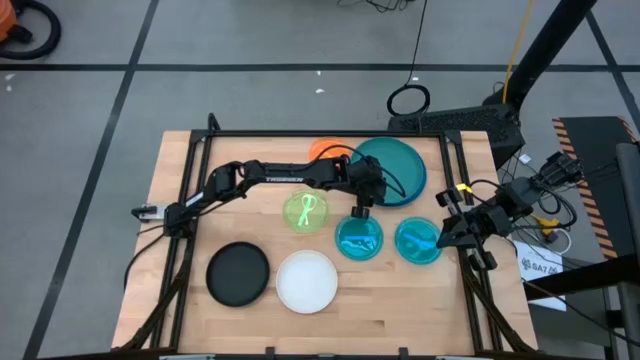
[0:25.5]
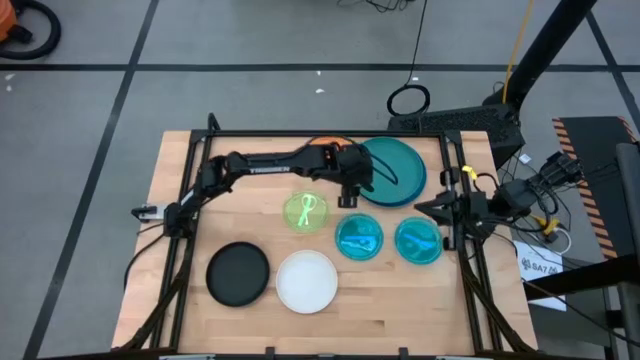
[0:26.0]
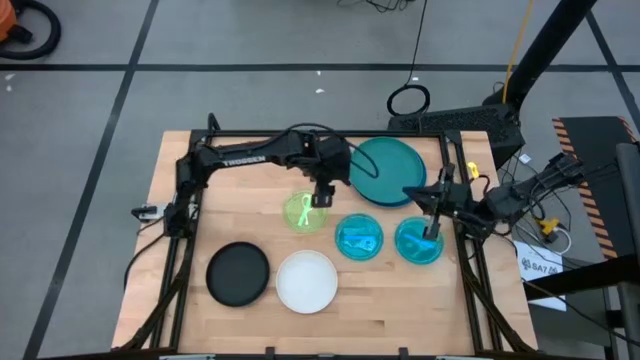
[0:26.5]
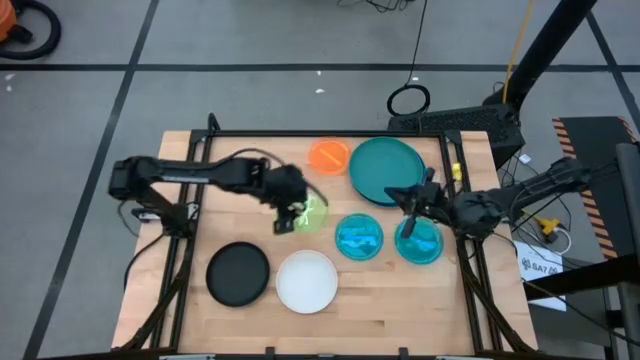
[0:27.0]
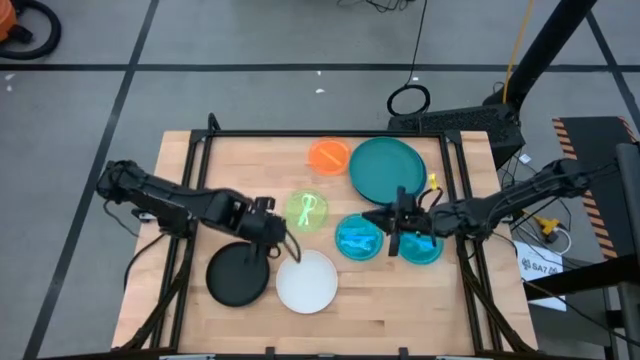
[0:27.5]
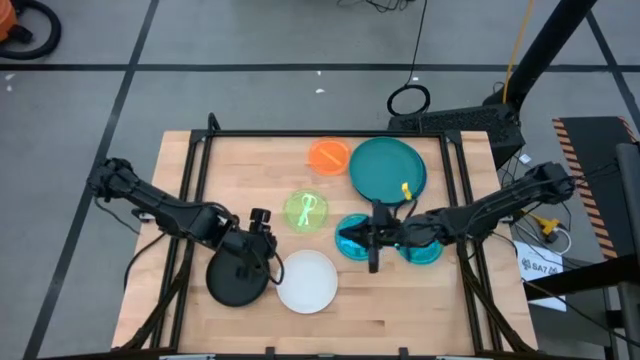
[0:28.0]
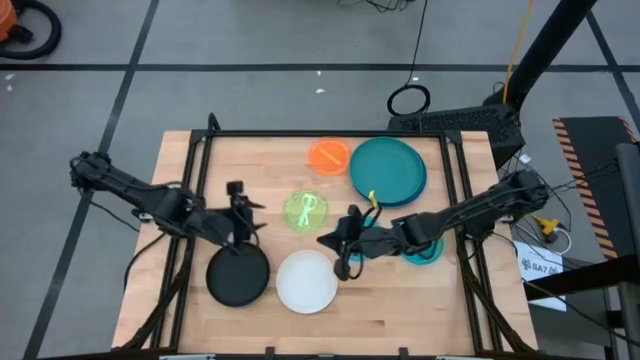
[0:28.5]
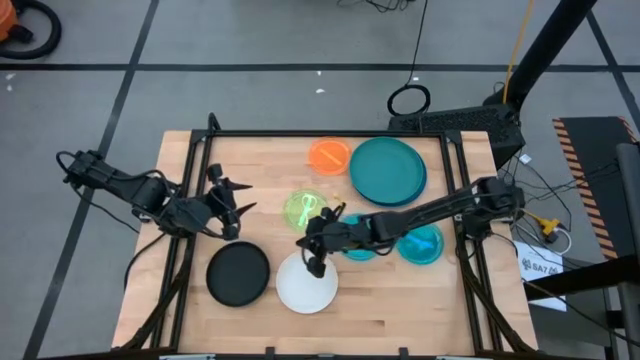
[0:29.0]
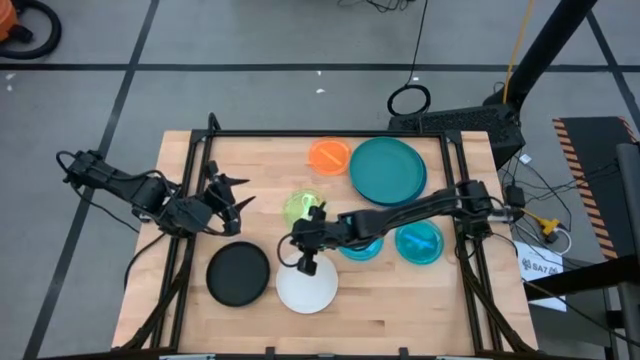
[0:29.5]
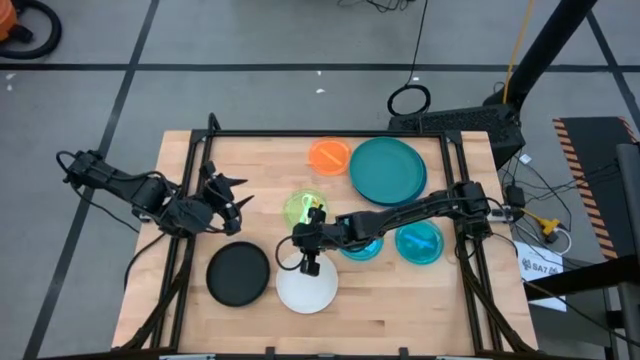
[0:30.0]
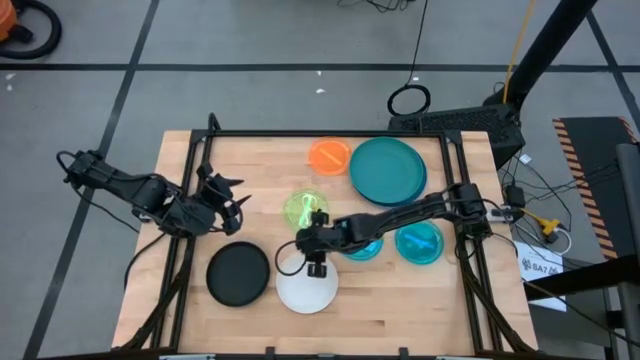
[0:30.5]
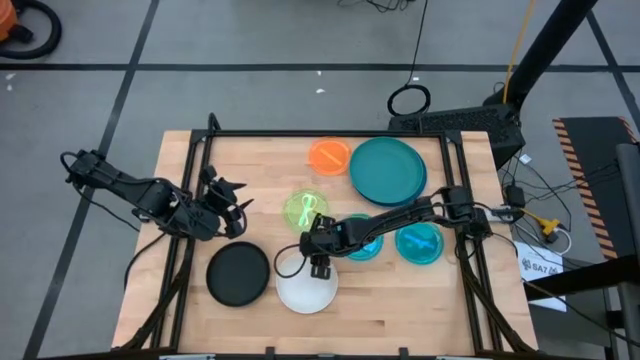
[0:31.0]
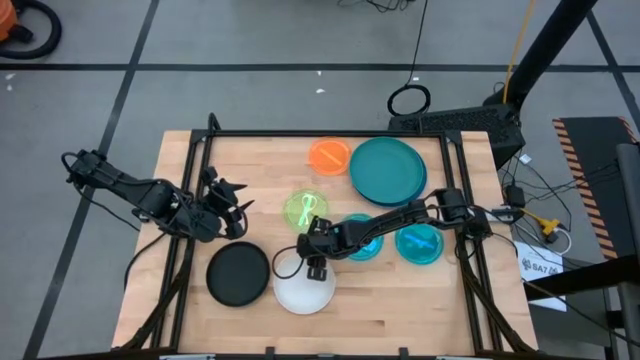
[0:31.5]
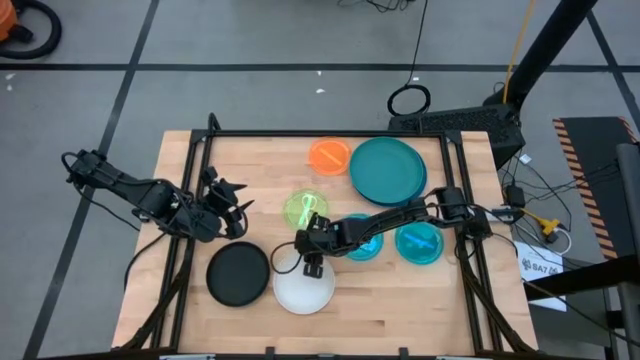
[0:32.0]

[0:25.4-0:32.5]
Task: Stack plastic plates
Stack the white plate on top of the black plate

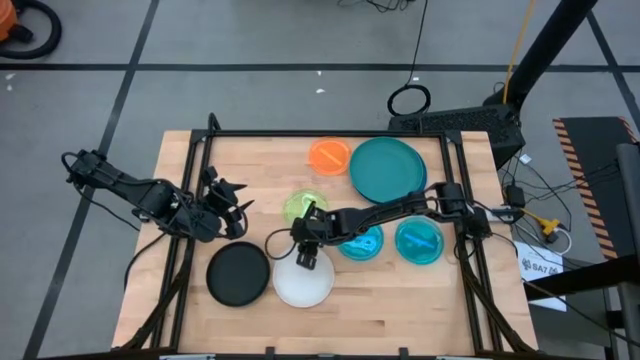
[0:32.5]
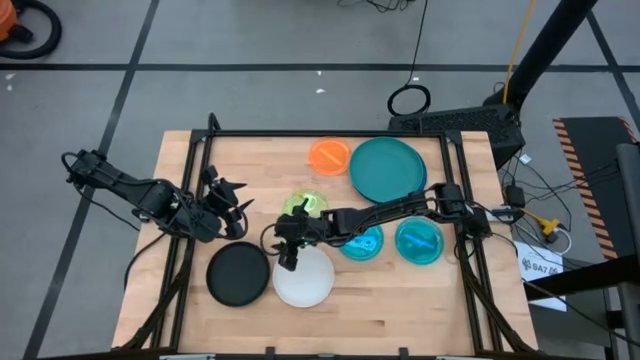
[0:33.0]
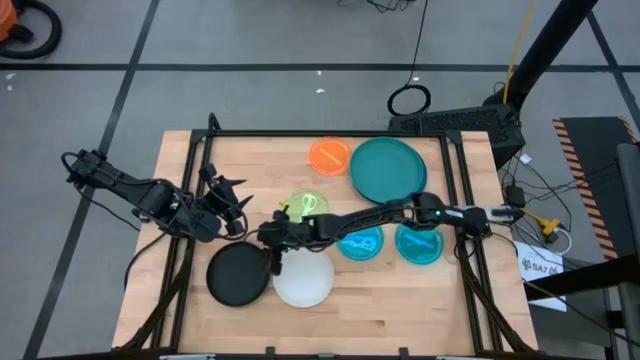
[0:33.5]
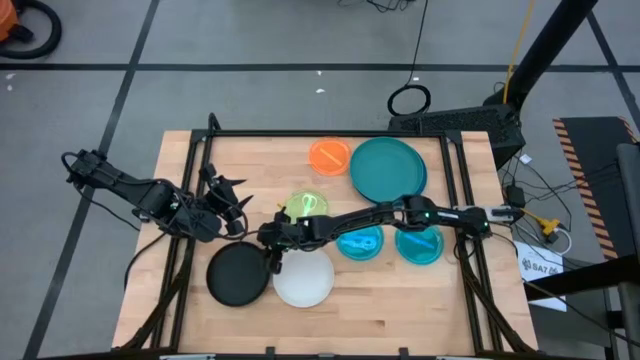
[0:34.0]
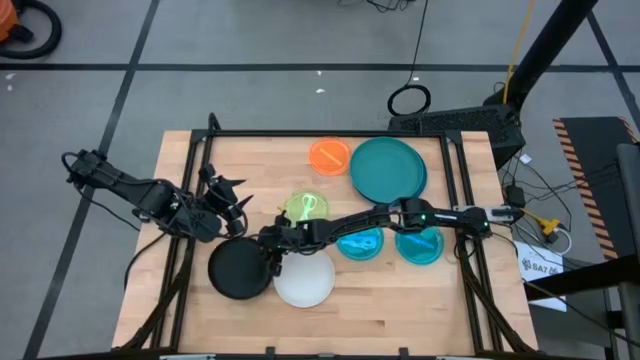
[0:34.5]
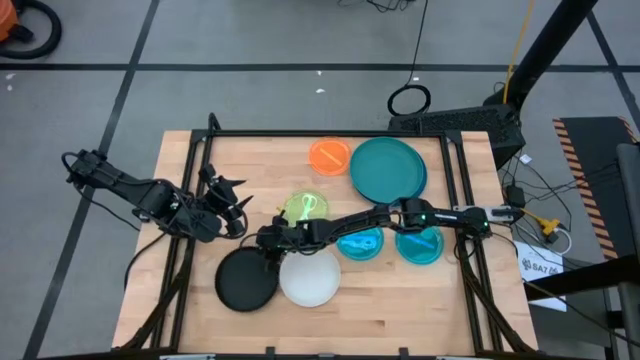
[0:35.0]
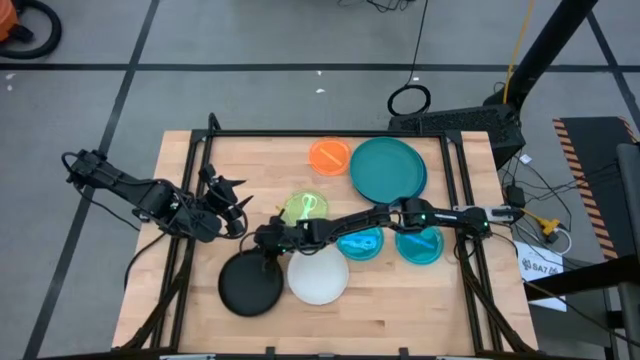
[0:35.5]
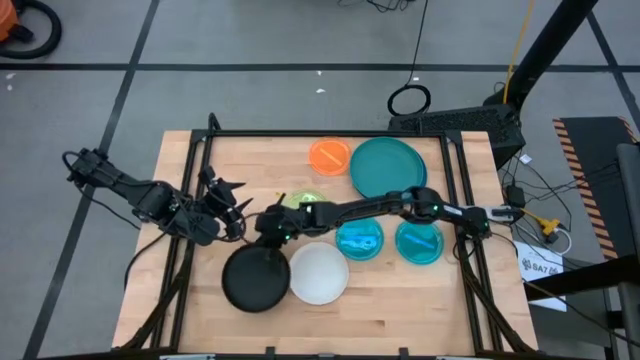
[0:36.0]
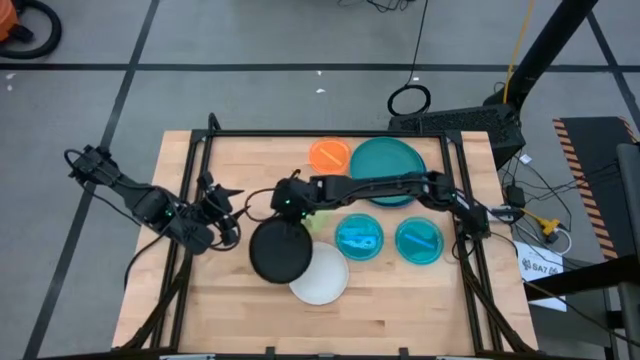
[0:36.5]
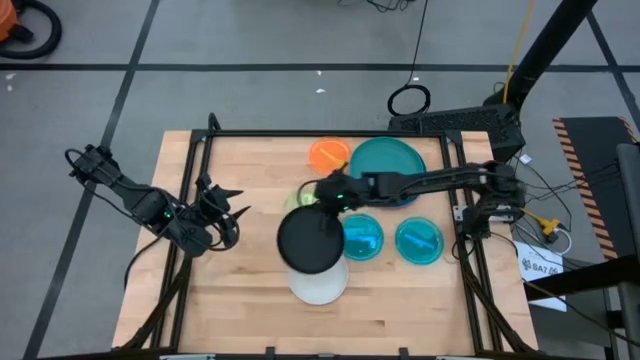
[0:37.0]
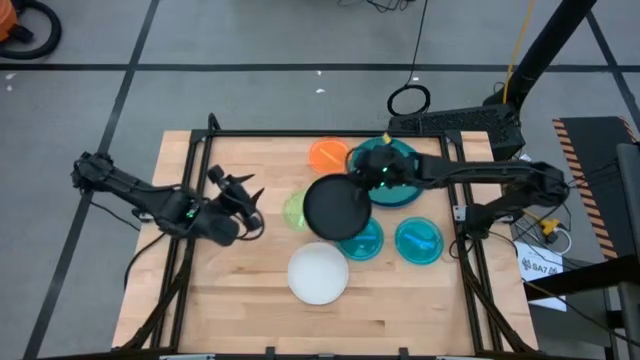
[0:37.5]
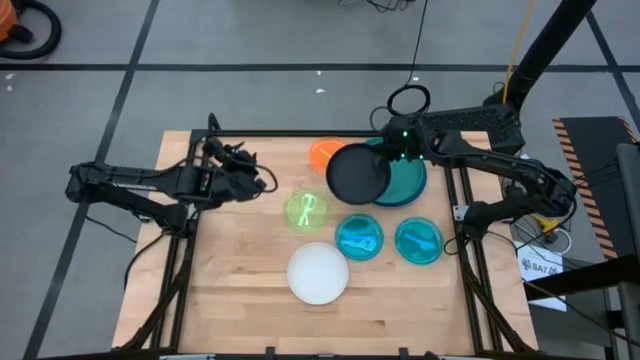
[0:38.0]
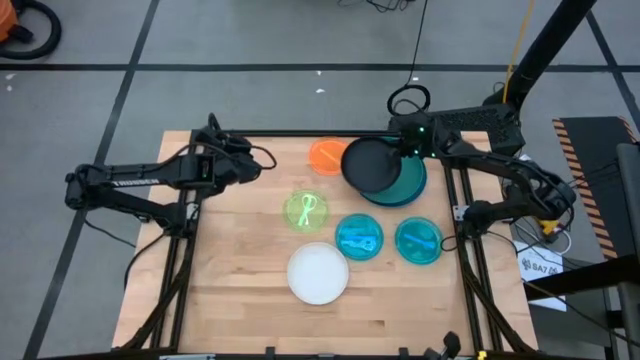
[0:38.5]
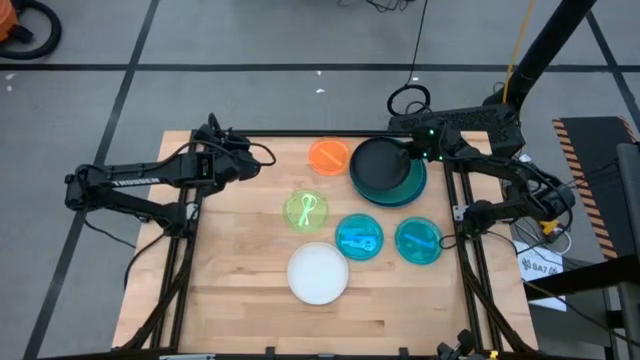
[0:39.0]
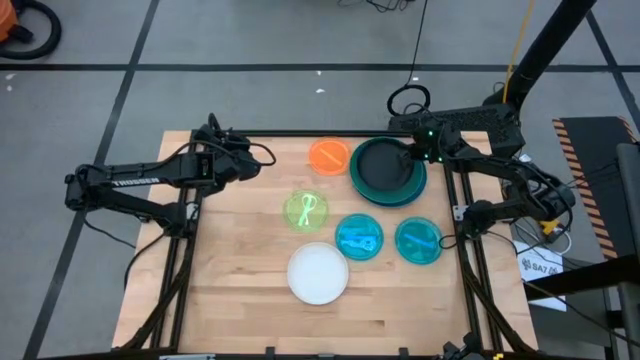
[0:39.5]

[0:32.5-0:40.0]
Stack the black plate on top of the green plate

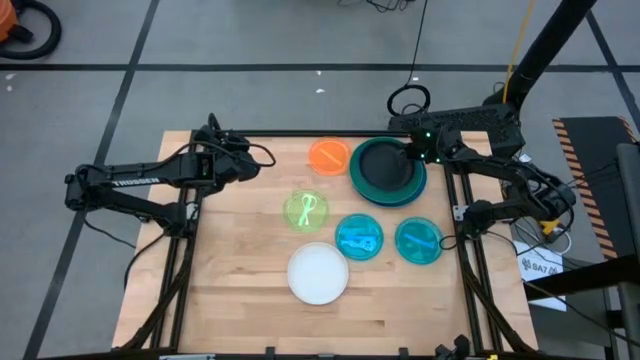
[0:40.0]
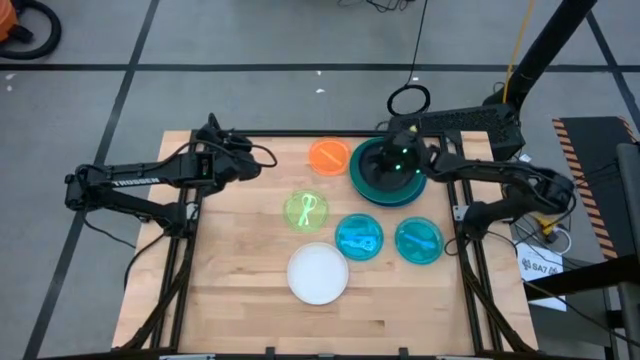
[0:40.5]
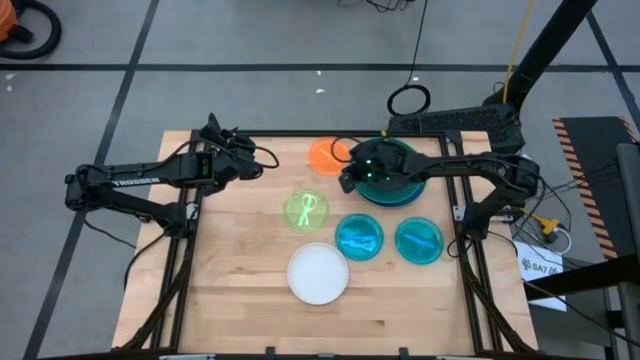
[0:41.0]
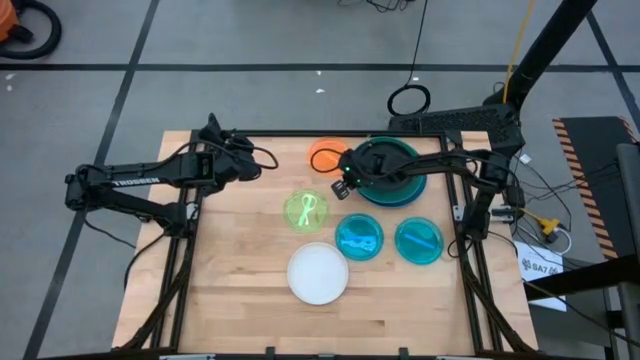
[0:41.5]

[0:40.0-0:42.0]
Adjust the stacked plates

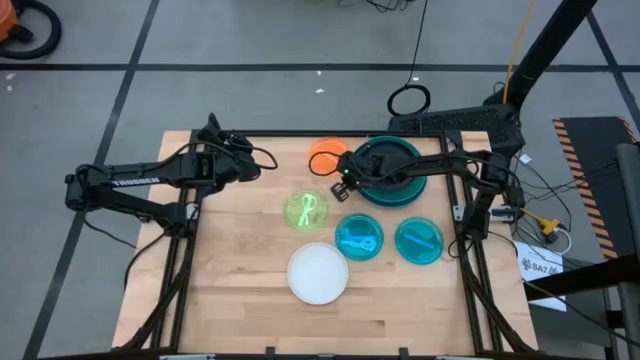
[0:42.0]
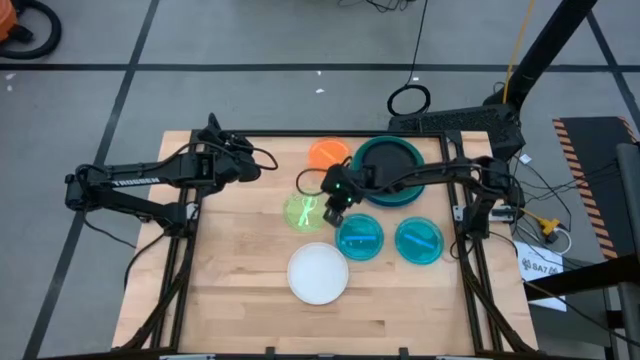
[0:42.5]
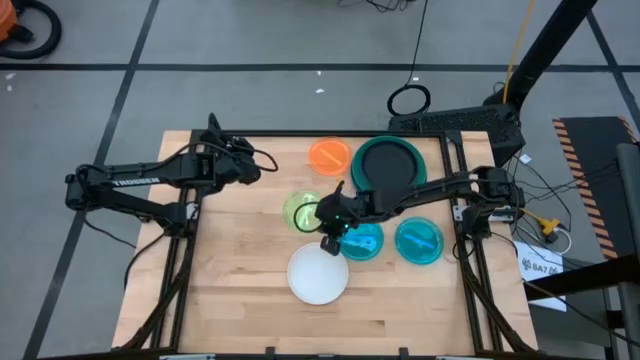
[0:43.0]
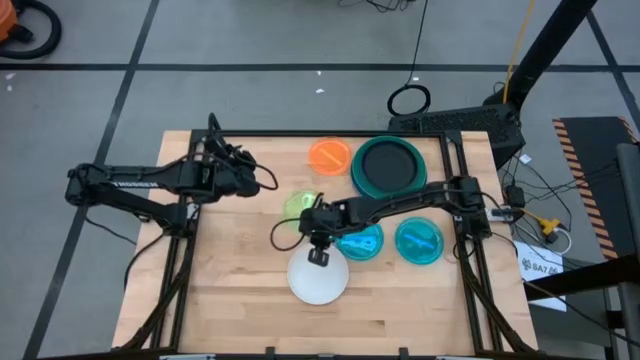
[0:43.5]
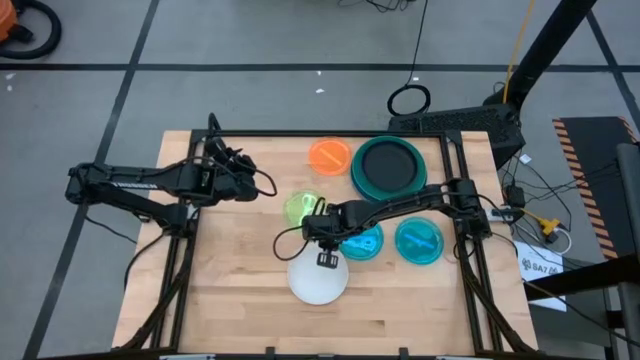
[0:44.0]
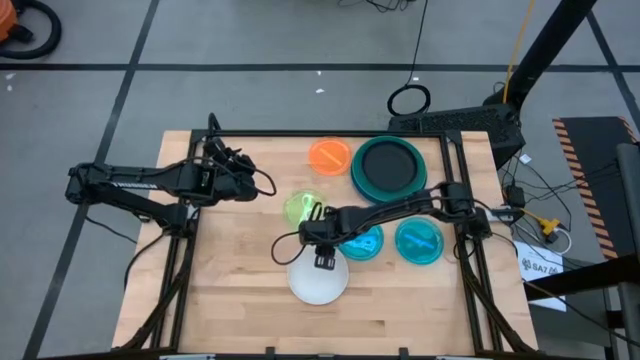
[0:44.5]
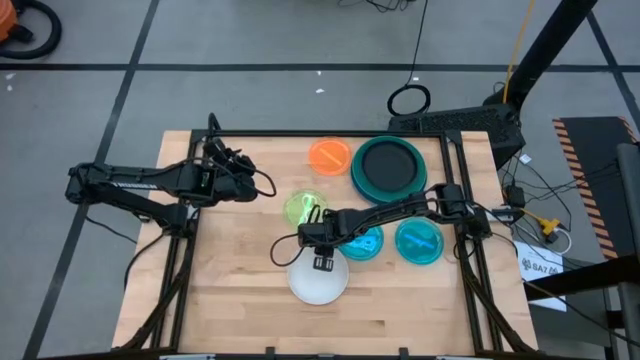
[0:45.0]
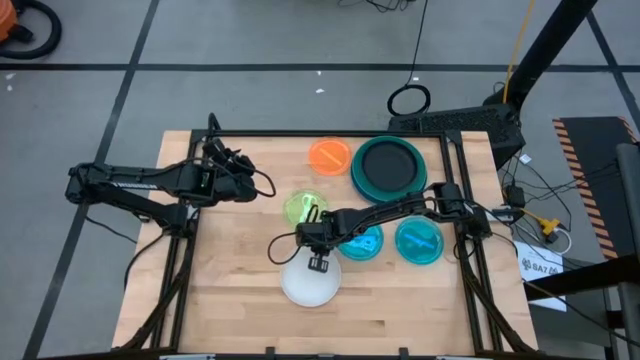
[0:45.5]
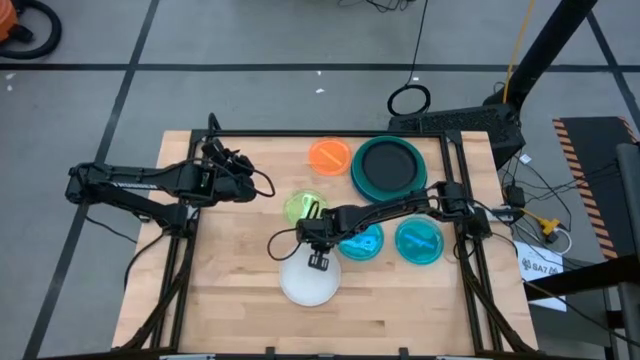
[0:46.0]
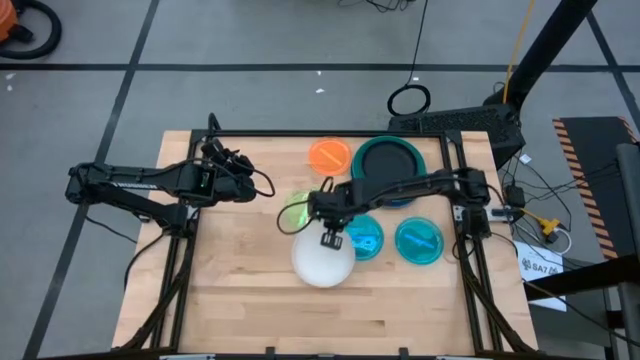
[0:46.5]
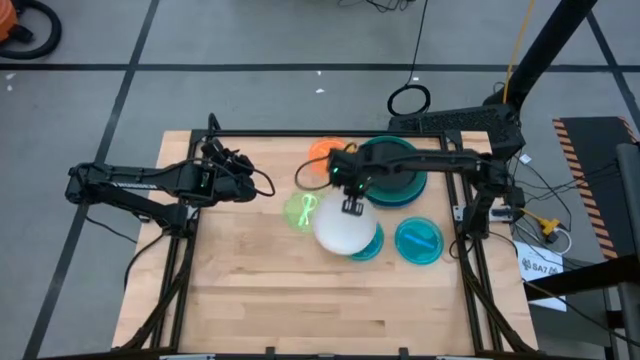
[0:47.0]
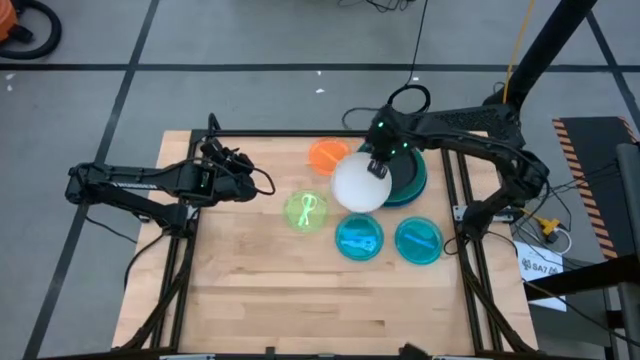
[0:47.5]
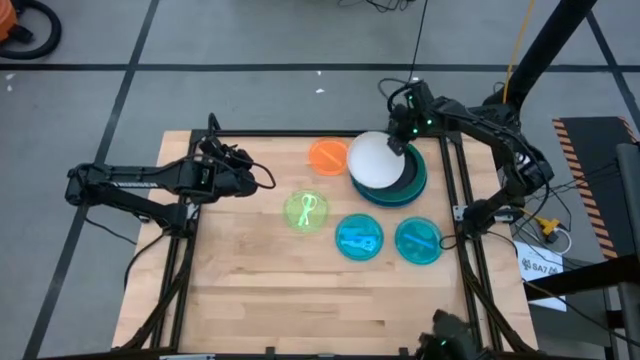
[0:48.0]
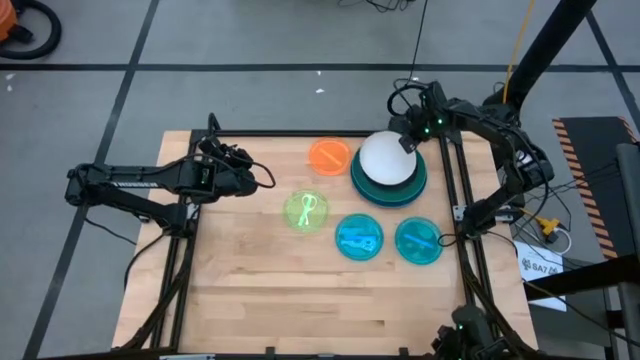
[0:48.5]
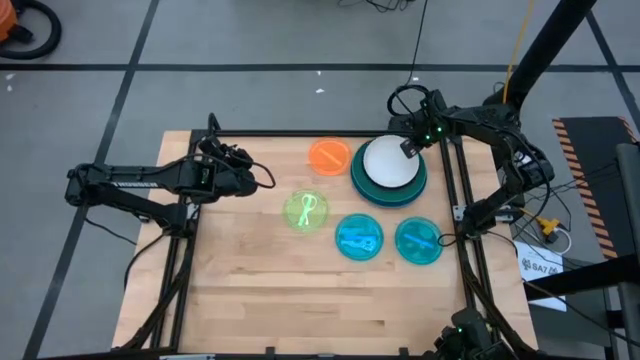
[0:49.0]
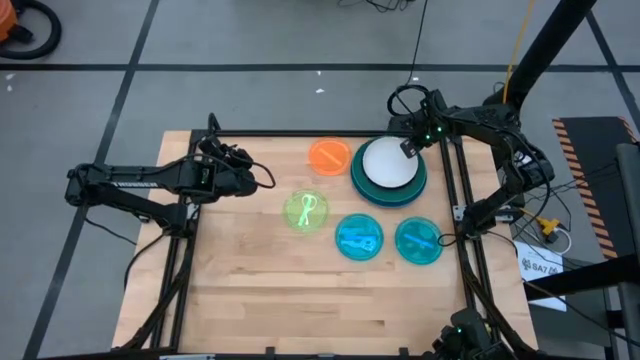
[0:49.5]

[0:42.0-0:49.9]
Stack the white plate on top of the black plate
